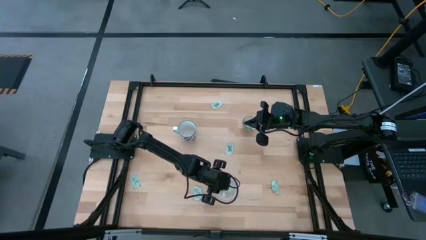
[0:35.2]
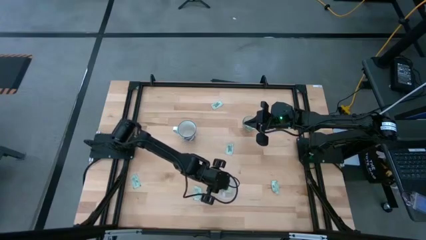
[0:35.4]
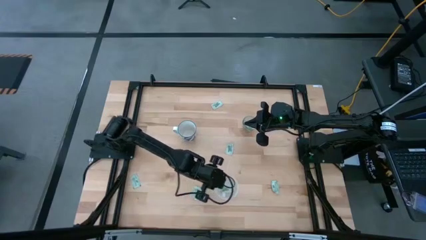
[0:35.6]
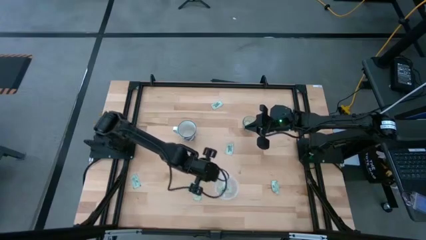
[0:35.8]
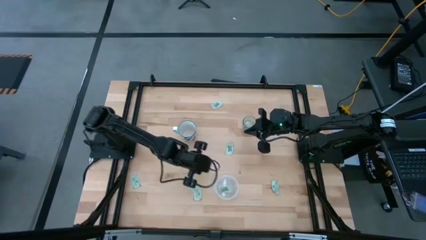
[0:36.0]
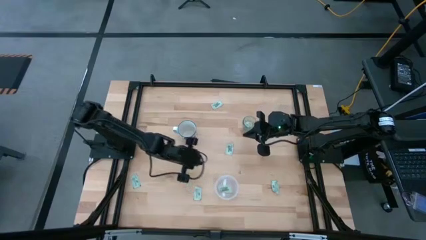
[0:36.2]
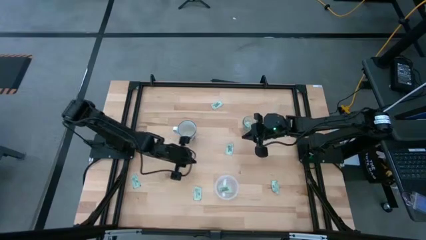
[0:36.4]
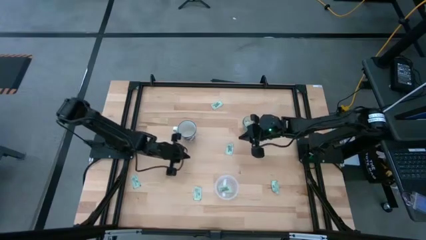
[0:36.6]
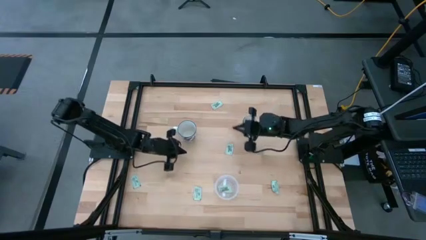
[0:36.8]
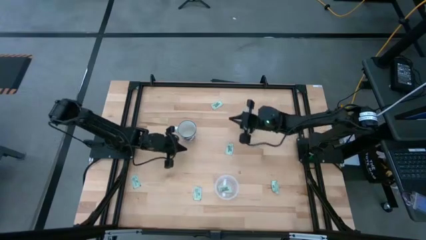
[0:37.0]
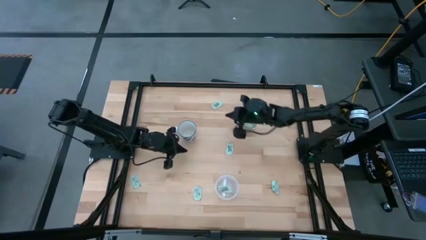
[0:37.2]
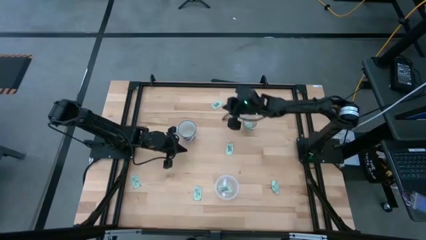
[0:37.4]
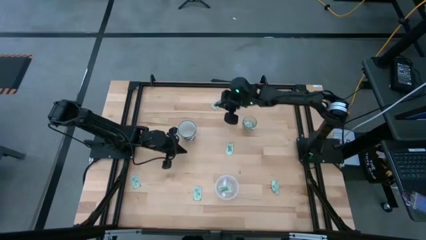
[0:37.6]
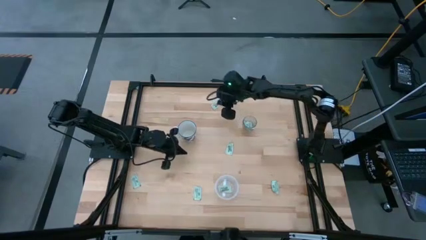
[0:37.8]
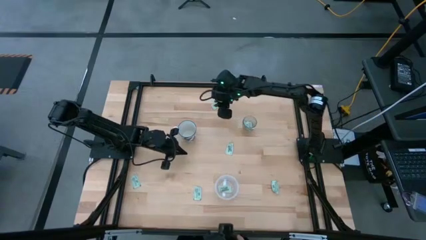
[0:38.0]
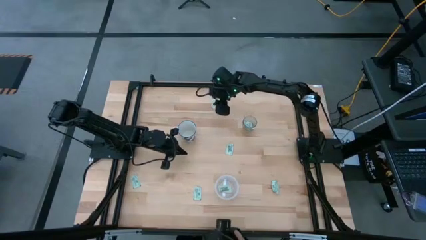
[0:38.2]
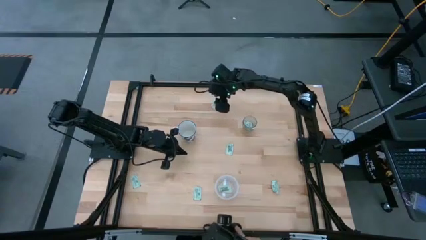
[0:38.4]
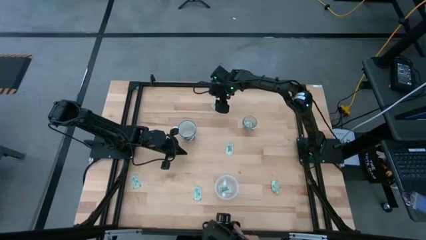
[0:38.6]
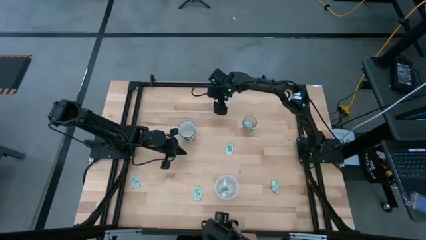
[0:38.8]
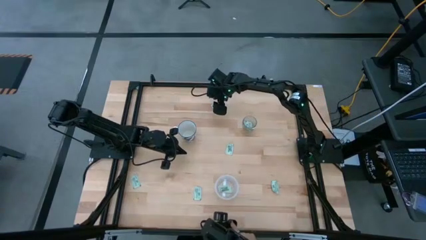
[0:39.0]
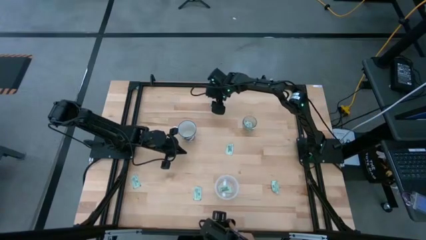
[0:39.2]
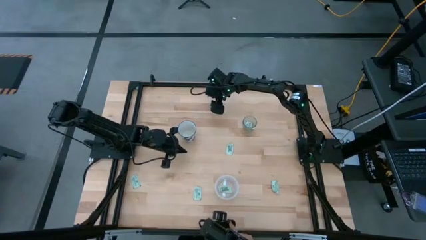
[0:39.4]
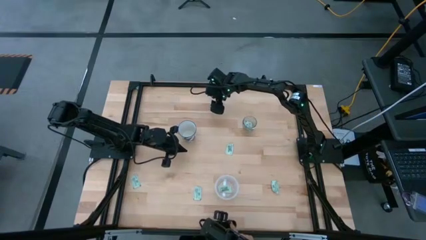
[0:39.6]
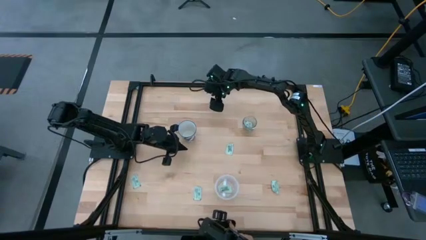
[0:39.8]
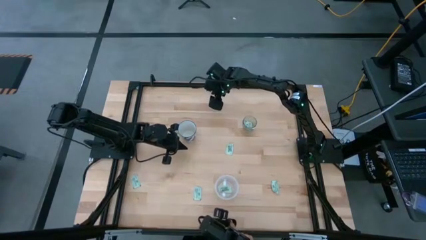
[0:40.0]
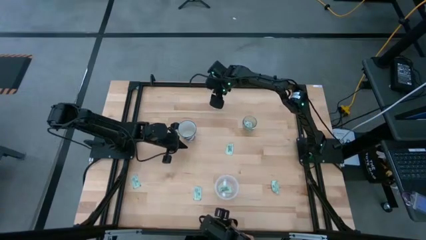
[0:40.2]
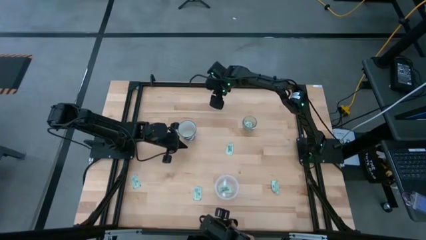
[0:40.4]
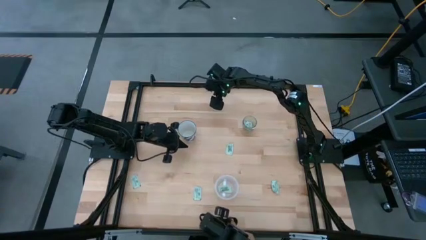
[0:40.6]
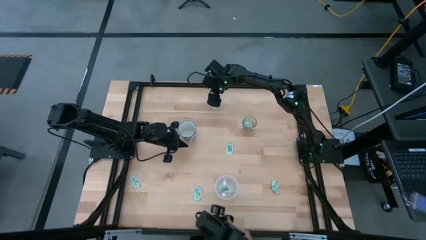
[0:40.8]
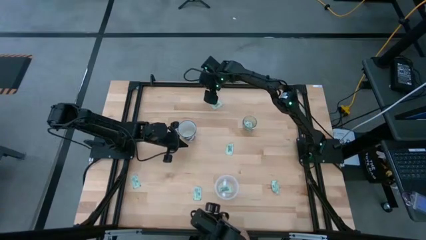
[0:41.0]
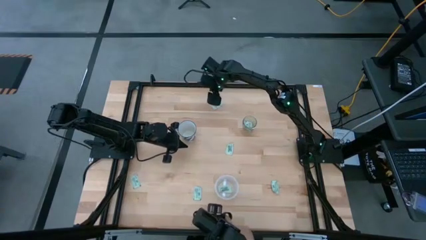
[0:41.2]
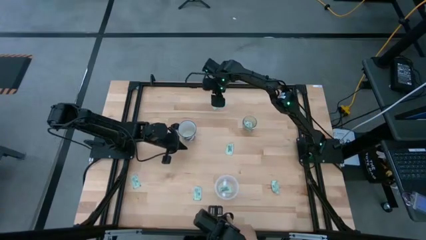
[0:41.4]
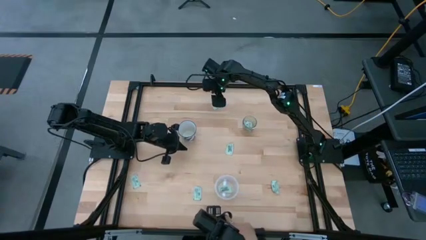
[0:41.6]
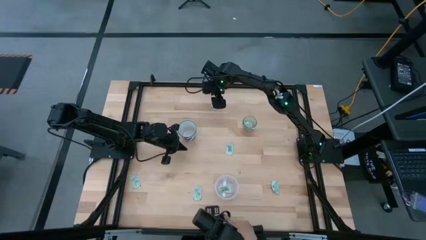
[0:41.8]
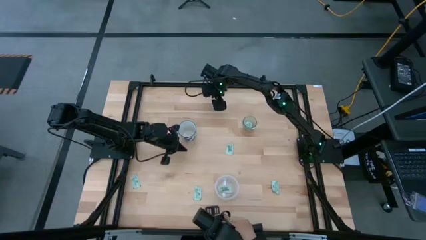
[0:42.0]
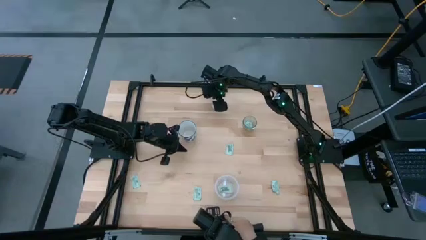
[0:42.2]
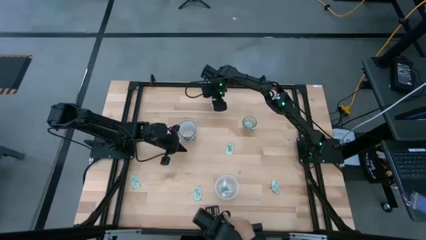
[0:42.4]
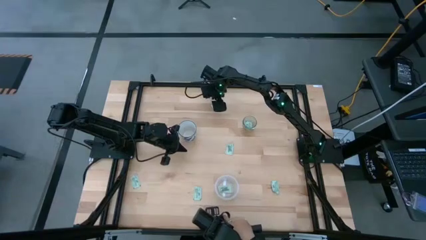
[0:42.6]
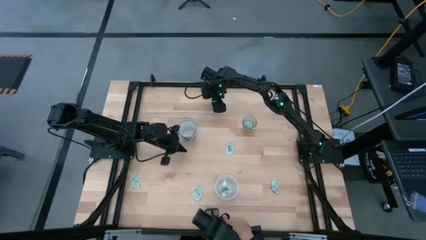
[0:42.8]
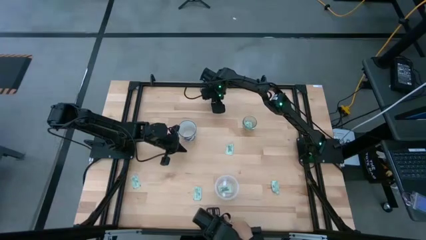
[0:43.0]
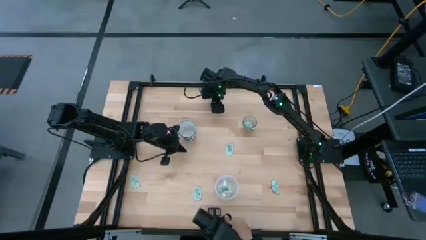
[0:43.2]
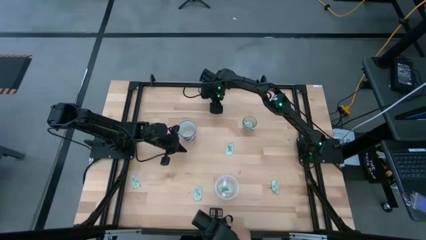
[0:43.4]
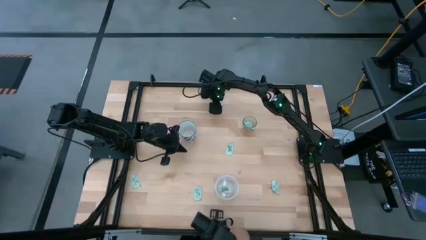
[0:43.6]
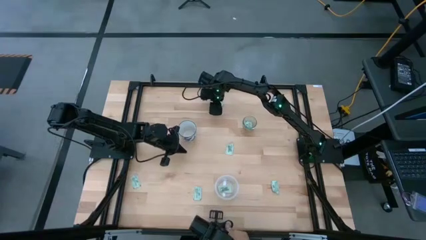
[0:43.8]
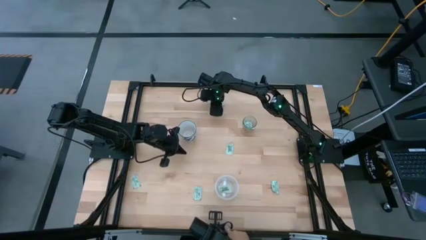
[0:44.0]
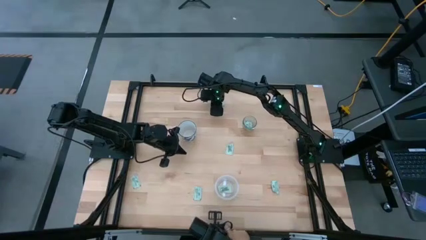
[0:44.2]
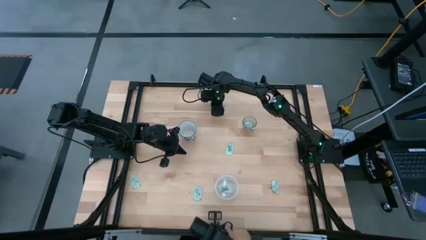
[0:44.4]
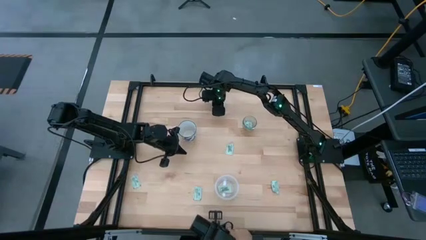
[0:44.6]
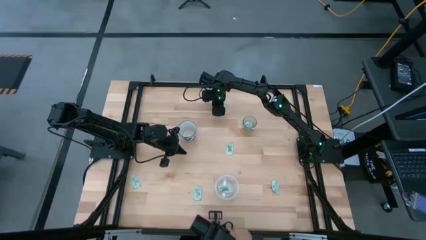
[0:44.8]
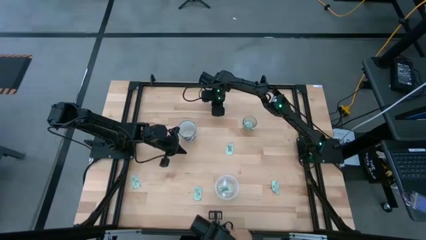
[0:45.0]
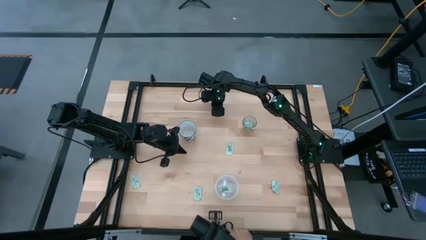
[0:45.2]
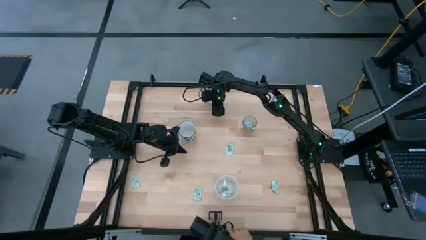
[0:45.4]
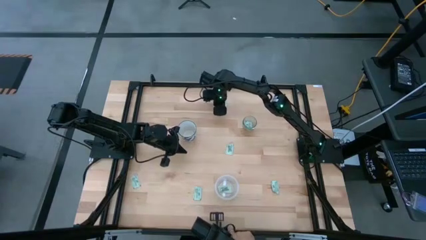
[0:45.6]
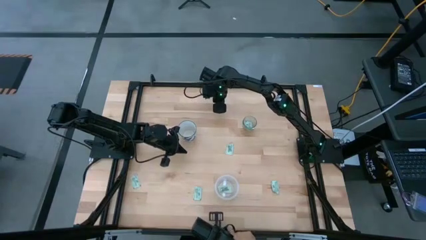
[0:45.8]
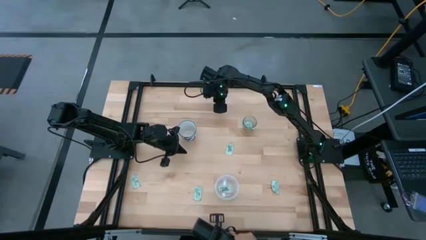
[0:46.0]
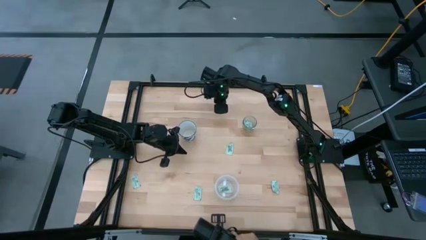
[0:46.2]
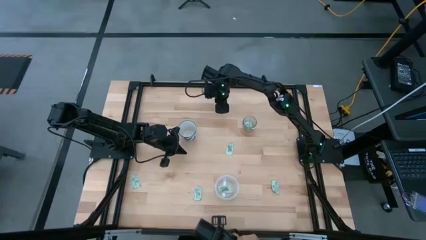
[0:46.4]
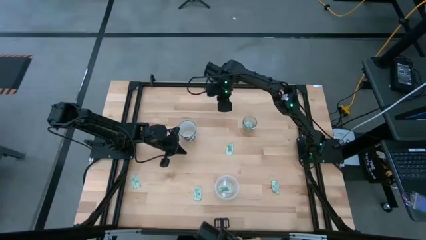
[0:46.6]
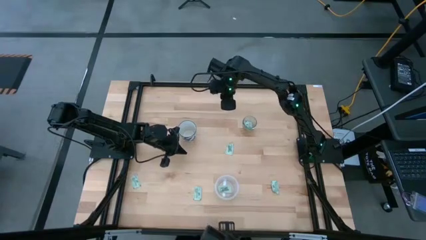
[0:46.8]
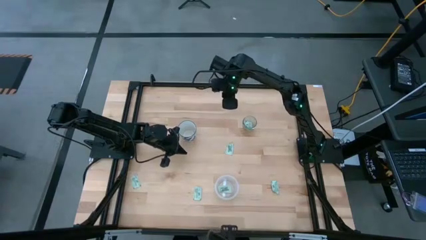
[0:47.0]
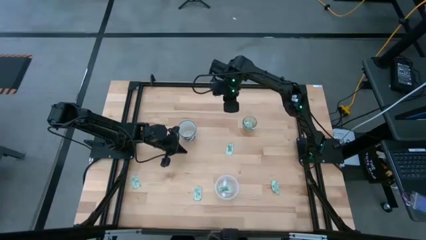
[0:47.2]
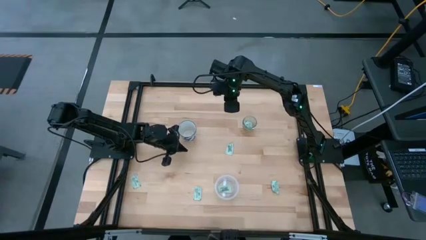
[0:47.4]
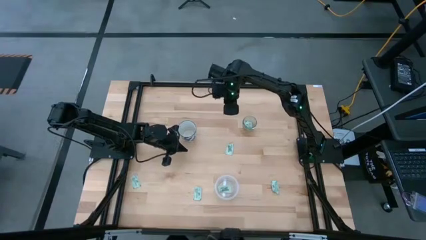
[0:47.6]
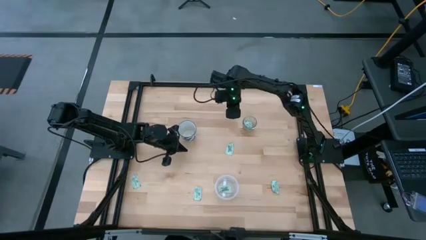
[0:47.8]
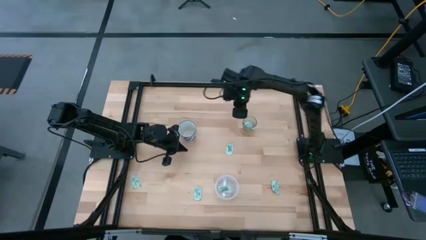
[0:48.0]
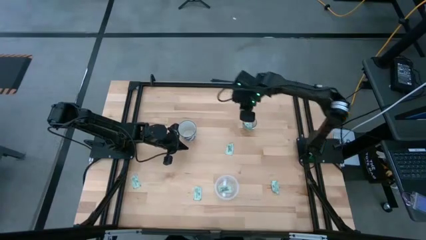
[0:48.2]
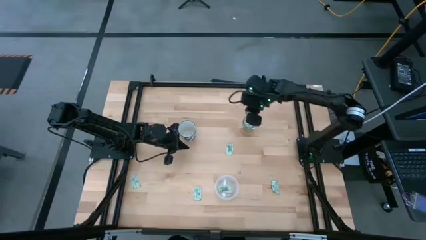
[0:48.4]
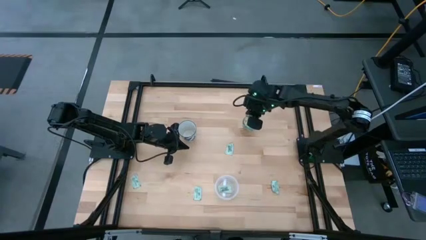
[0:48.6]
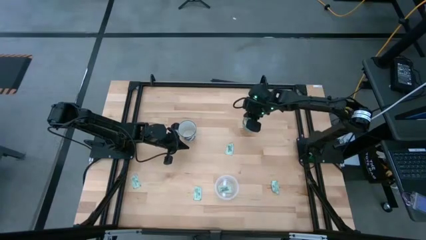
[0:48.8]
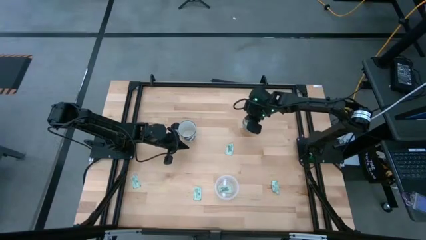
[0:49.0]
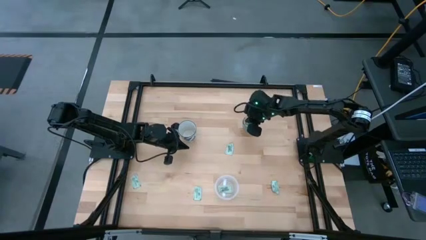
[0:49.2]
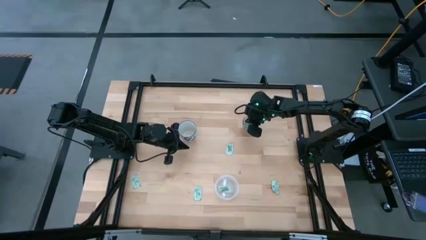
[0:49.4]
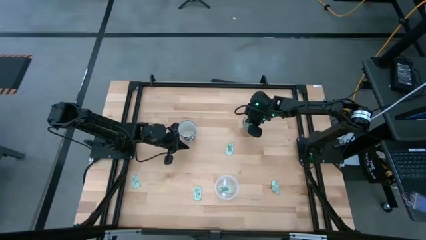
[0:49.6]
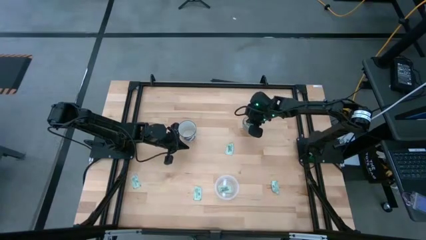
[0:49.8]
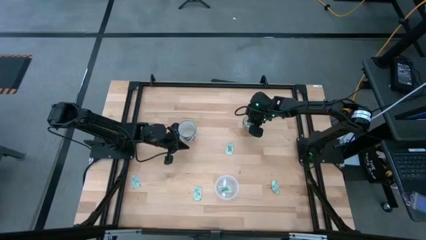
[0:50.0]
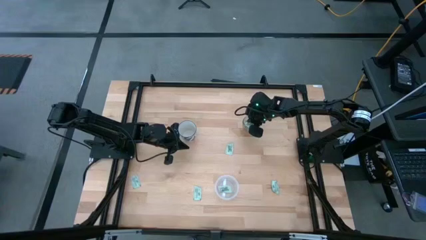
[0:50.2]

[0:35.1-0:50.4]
Task: Pick and place Stevia / Truvia into bins
Put the white stevia packet into the transparent glass cup
